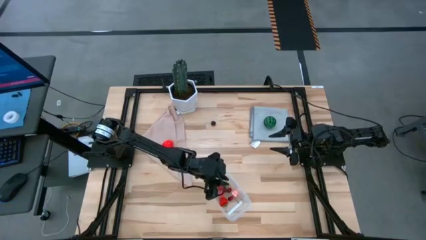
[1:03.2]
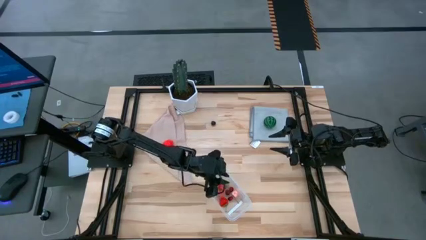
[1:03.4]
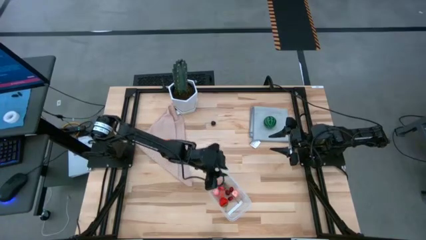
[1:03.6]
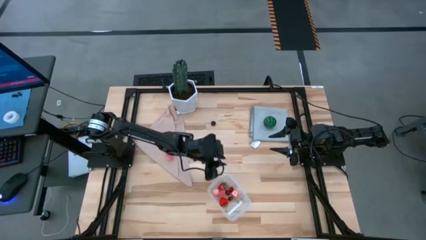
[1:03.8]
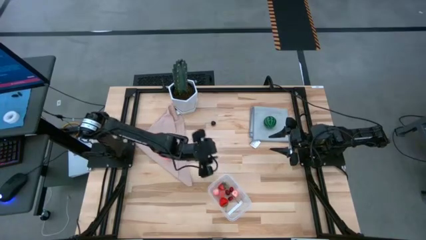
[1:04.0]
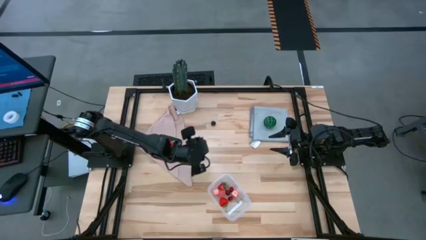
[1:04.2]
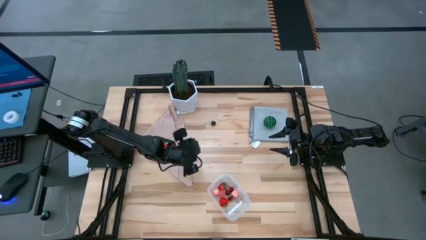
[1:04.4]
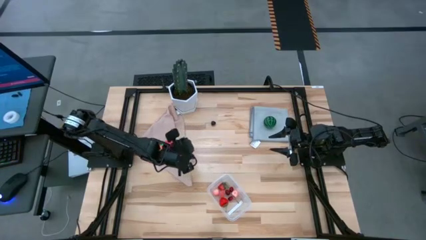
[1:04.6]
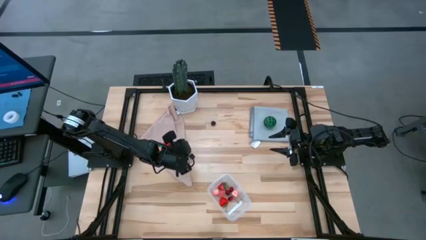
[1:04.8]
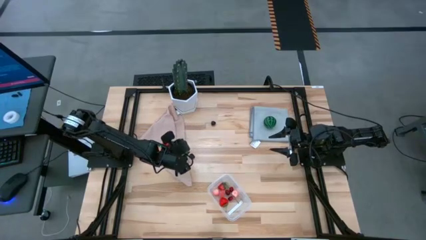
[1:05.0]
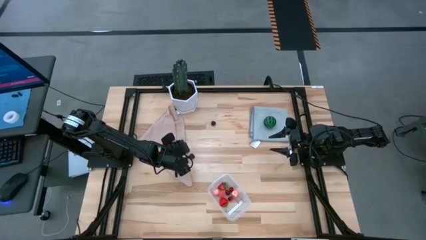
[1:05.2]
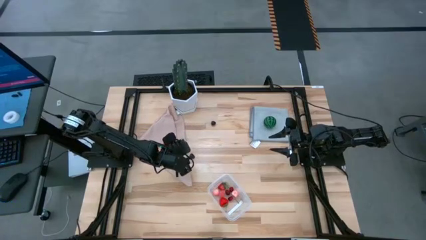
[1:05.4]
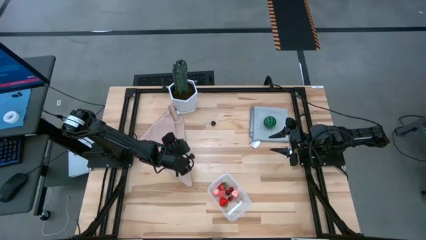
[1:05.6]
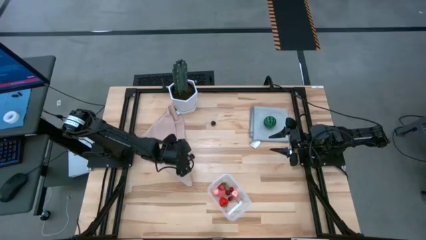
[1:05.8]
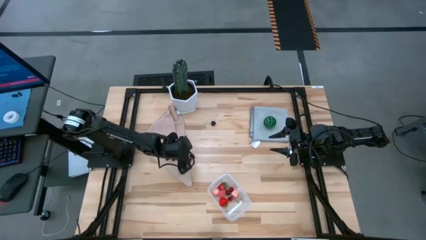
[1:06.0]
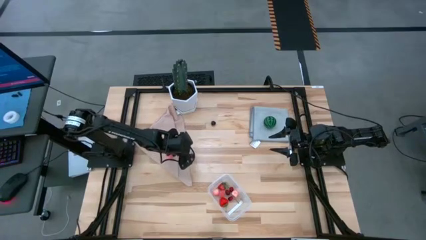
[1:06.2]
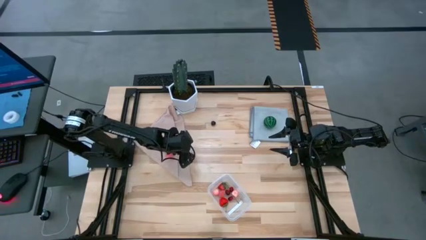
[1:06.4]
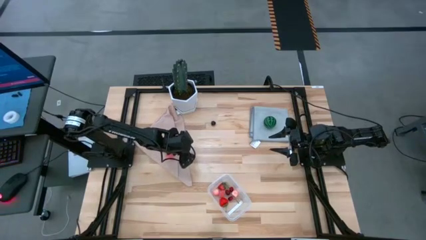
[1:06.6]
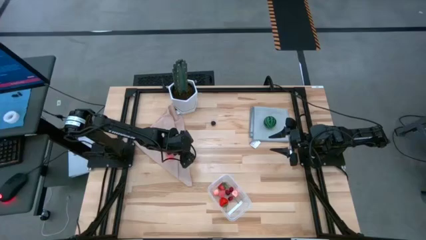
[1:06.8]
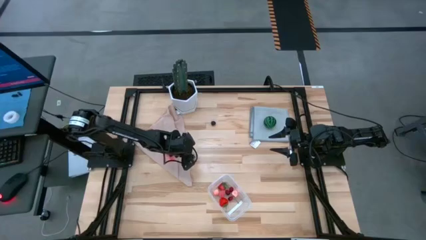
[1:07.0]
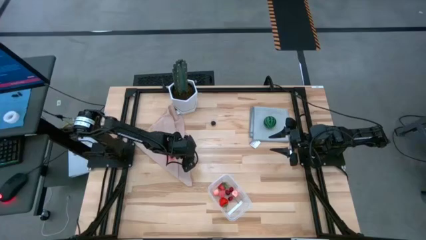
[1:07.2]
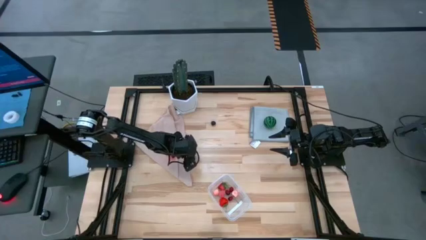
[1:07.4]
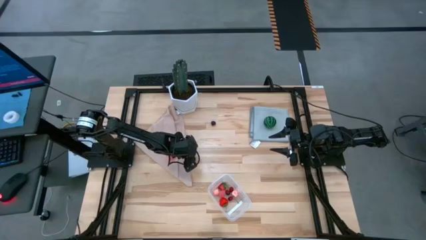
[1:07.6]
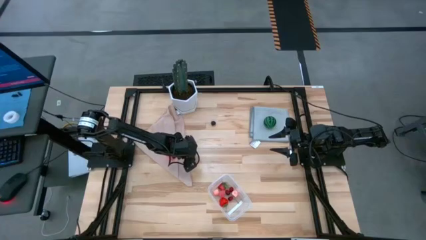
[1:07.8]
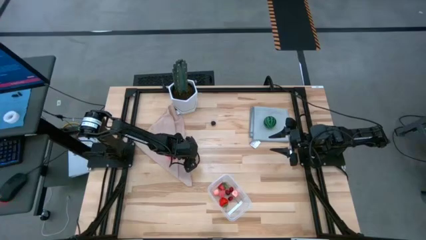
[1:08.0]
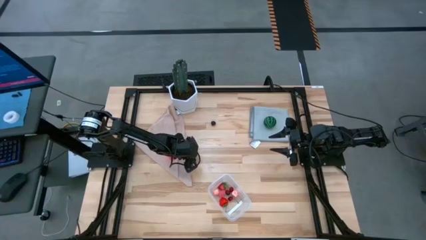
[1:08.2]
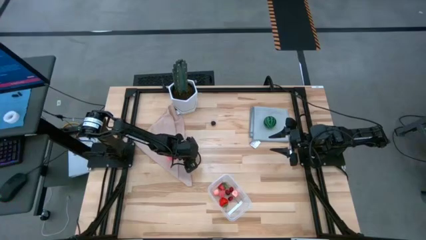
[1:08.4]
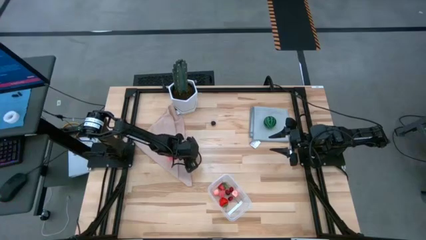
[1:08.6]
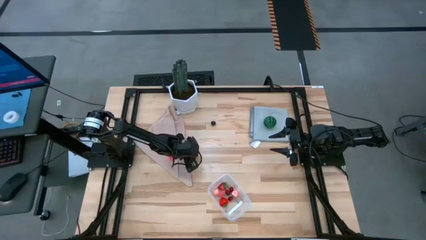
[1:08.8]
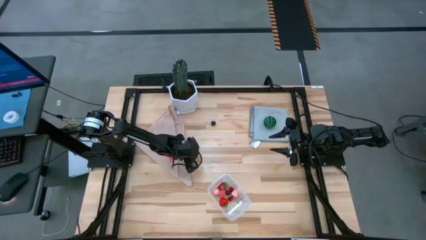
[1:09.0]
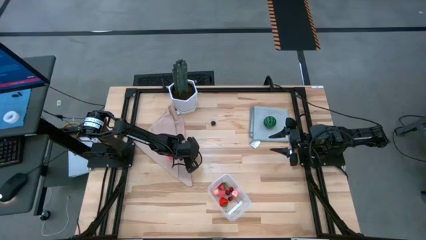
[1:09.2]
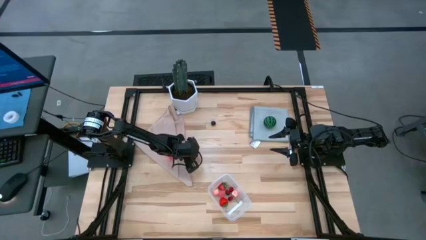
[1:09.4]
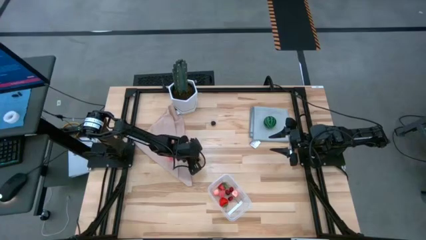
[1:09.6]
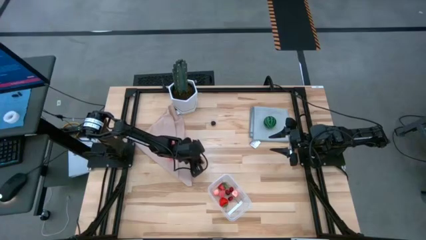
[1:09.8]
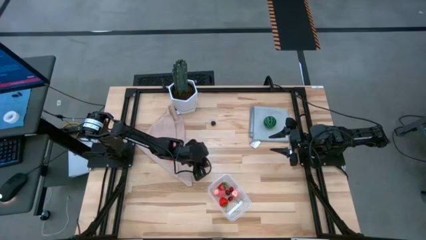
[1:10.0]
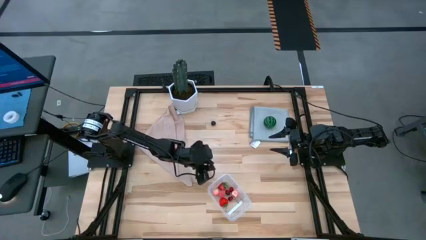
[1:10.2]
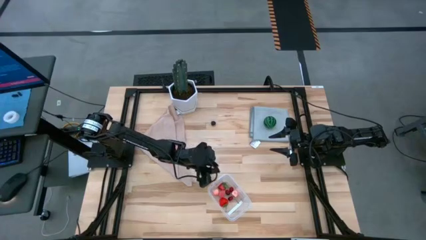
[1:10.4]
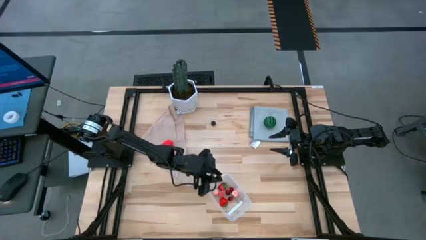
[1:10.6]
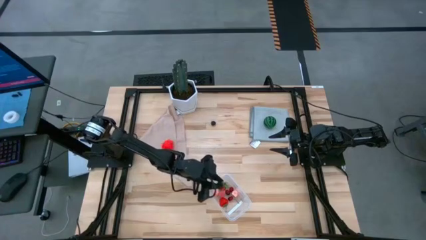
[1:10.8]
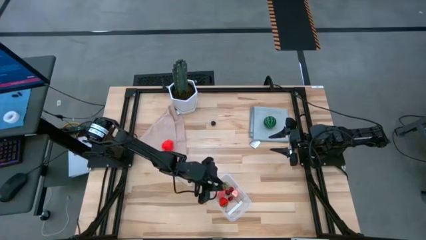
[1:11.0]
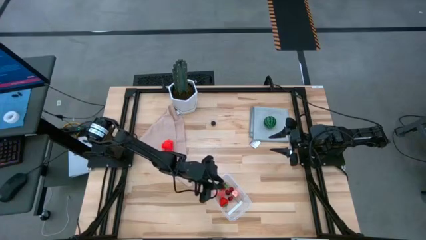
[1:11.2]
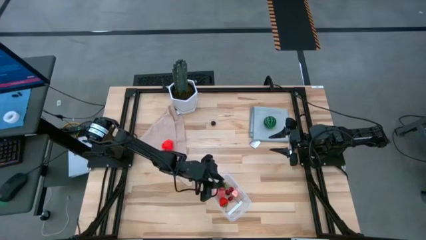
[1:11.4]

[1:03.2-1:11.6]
Task: Pick and placing Produce into tupperware
Put the black raspberry into the transparent bin

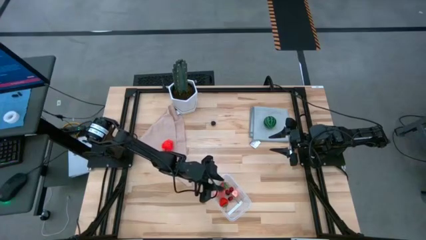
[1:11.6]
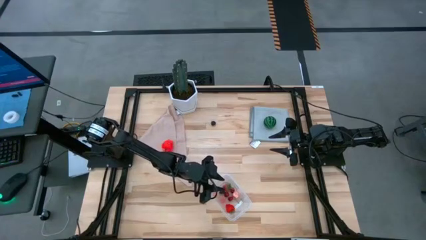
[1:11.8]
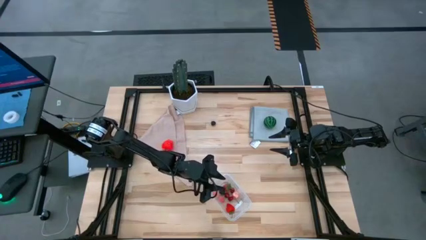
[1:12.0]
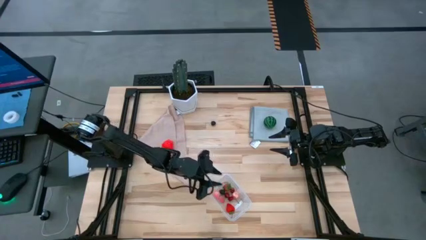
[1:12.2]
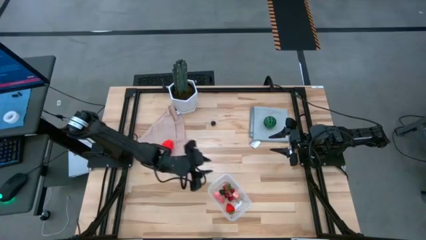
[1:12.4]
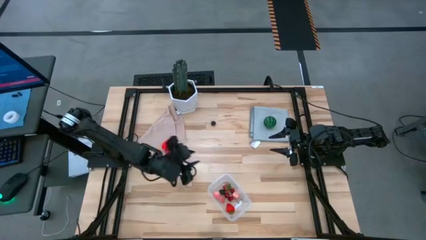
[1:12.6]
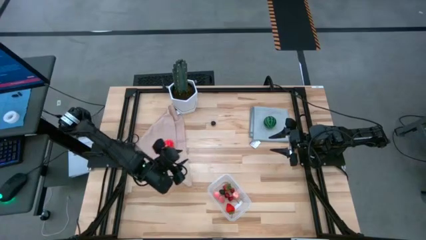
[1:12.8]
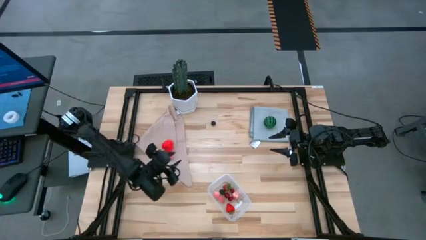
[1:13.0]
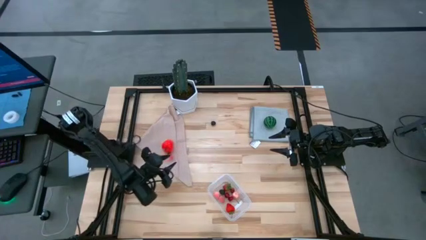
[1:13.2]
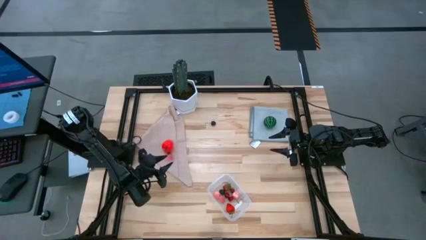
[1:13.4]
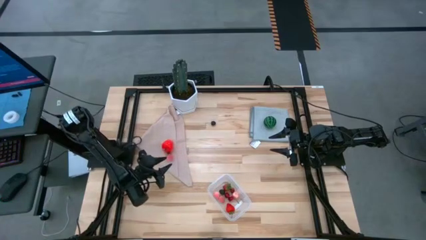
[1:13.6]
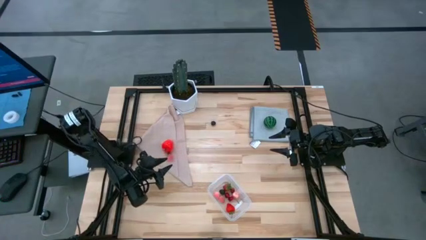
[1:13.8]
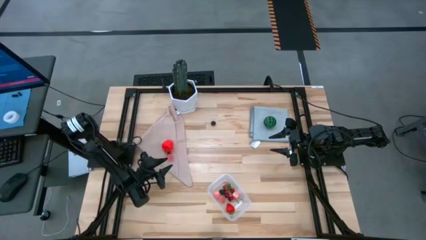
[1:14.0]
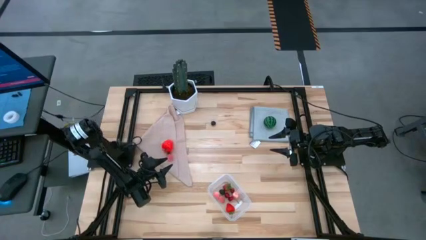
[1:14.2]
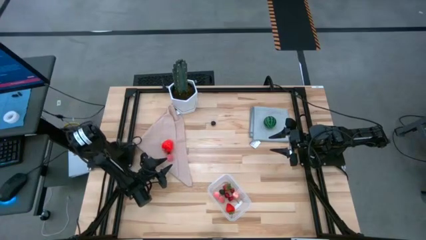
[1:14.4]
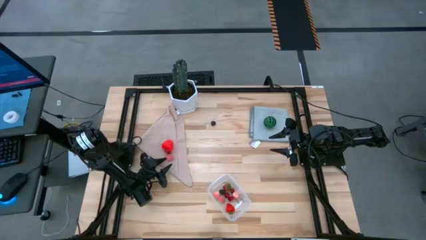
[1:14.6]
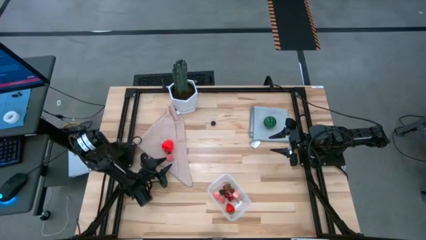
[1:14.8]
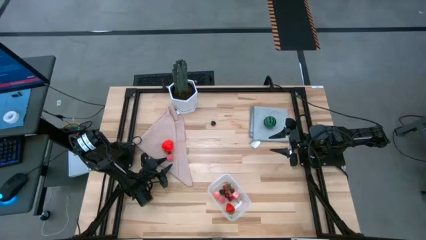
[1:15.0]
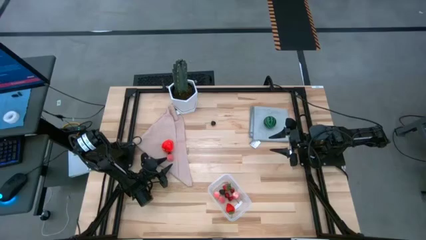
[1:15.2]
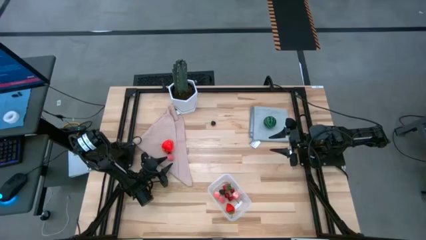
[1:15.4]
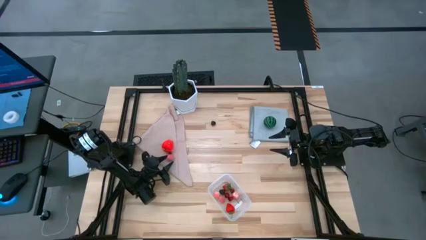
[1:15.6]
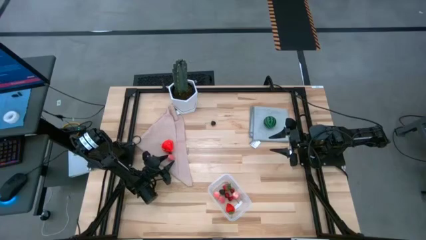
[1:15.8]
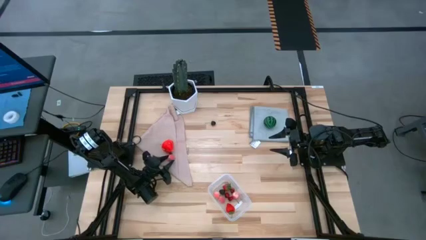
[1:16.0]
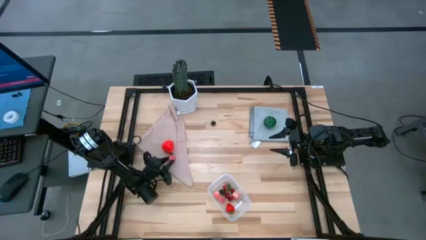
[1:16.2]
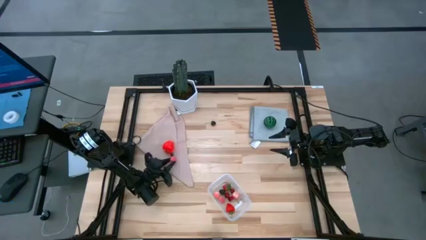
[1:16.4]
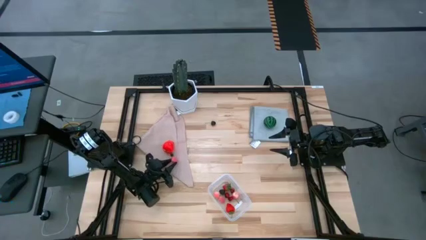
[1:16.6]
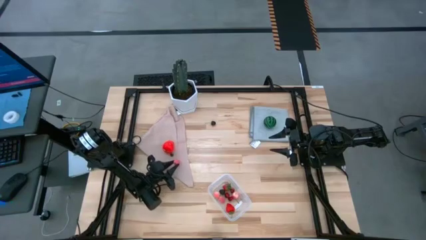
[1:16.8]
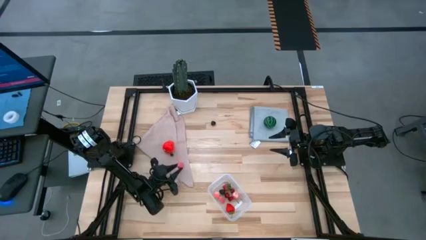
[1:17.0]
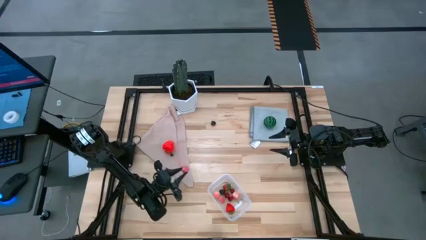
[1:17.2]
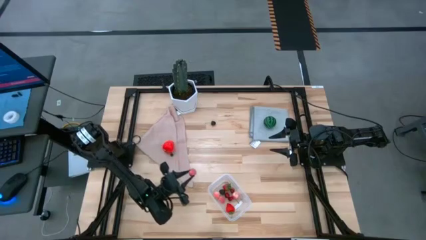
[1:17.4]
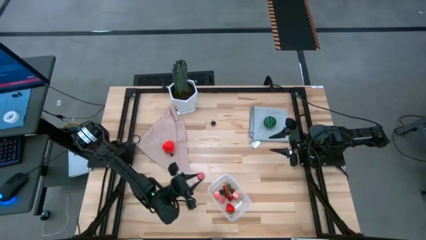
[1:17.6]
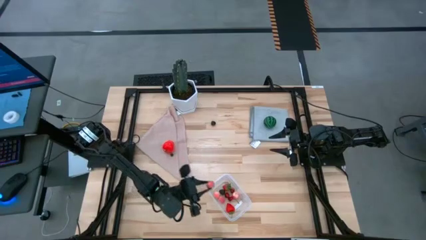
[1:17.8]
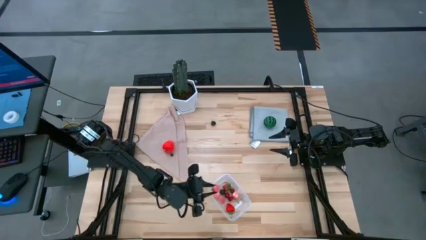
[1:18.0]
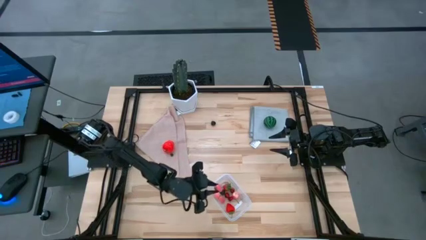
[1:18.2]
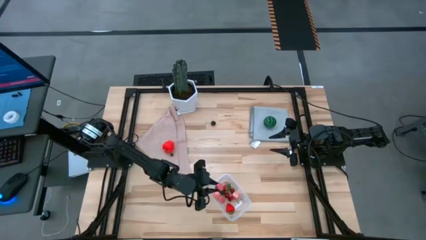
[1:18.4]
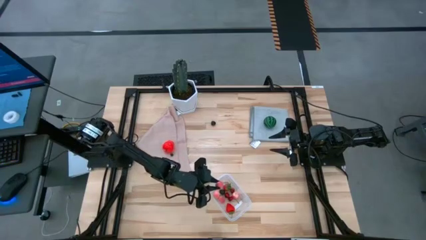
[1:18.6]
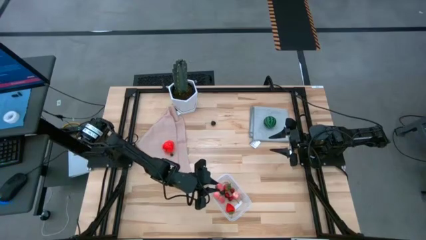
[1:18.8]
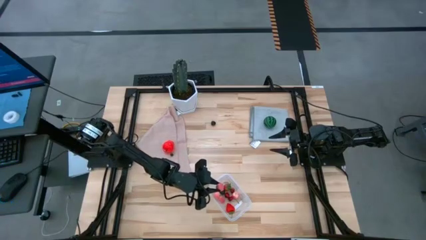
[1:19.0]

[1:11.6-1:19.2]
Put the peach into the transparent bin
